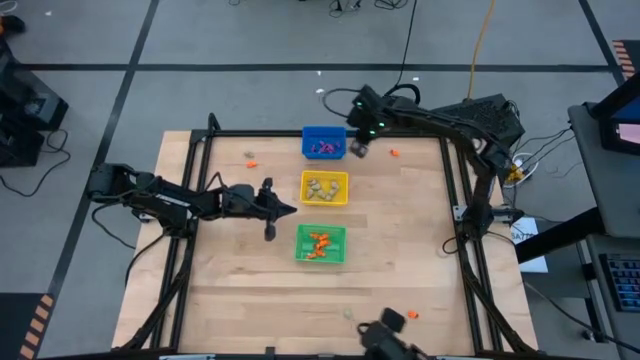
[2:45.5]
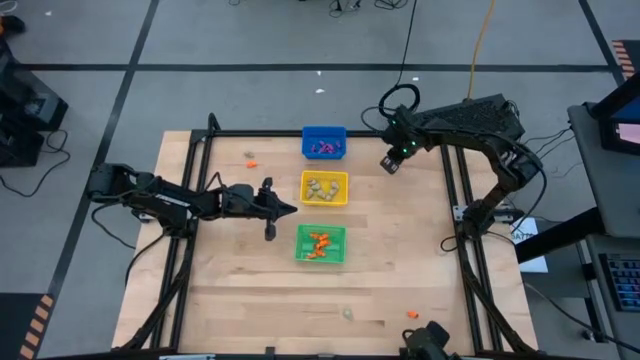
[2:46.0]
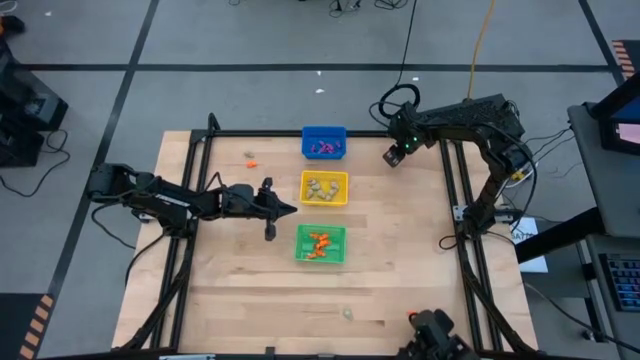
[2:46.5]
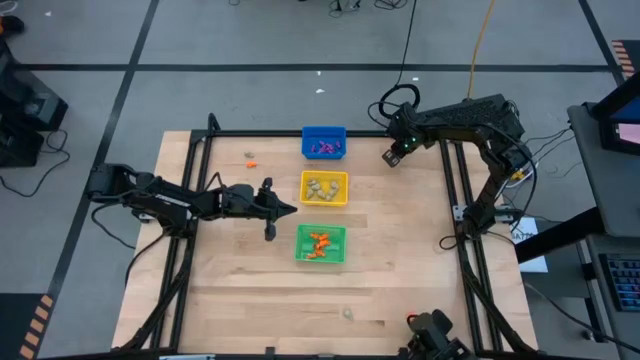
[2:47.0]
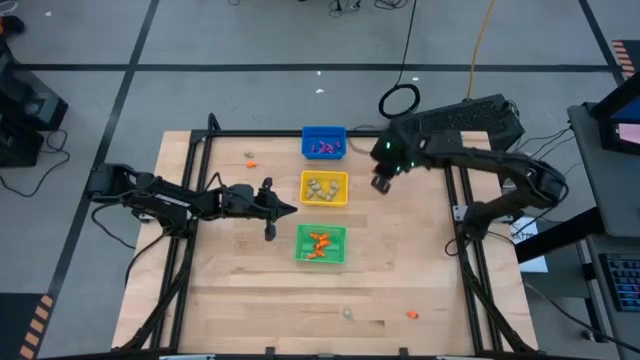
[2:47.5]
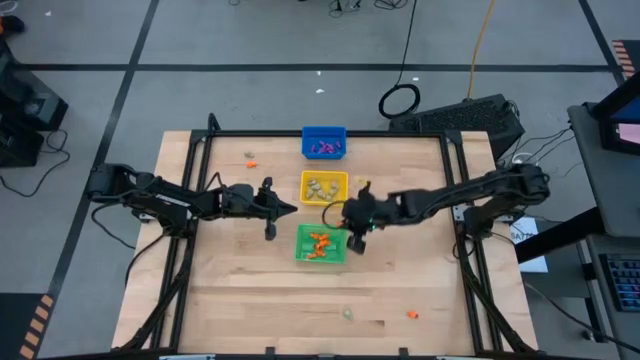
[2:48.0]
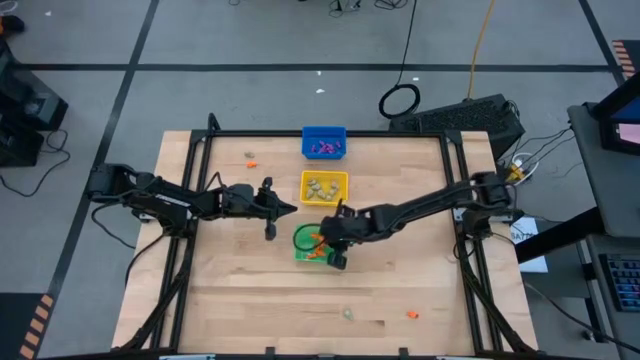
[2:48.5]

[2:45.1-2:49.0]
Task: Sort Halloween decoration
Put the right orange skeleton toy into the green bin

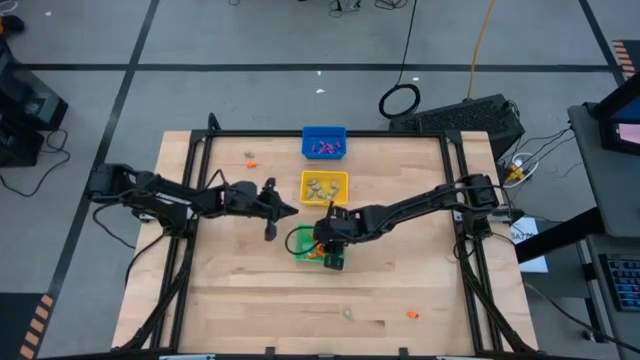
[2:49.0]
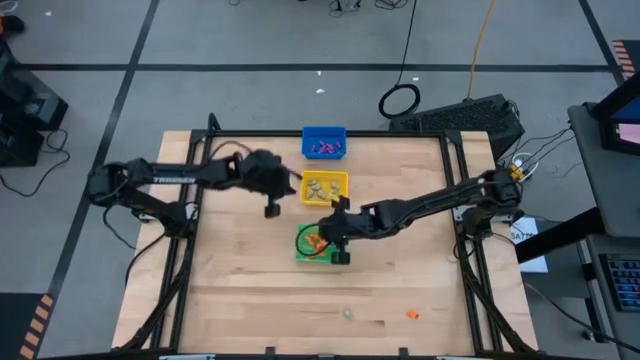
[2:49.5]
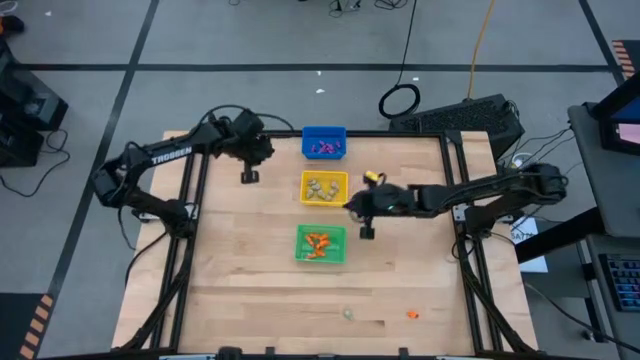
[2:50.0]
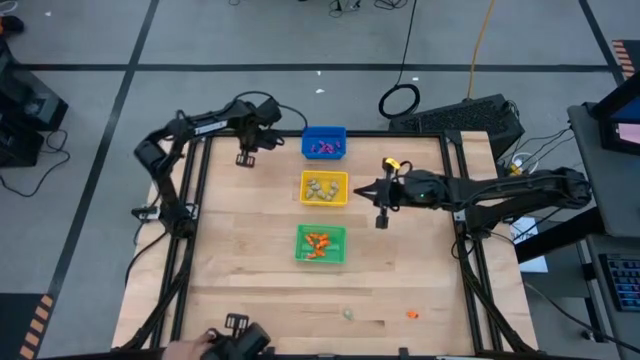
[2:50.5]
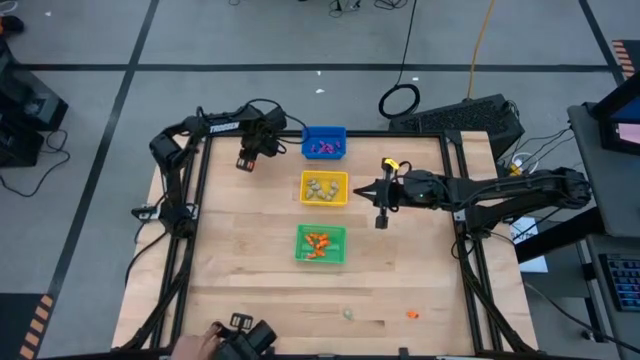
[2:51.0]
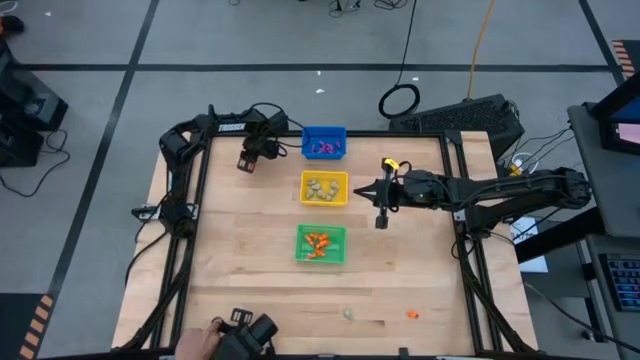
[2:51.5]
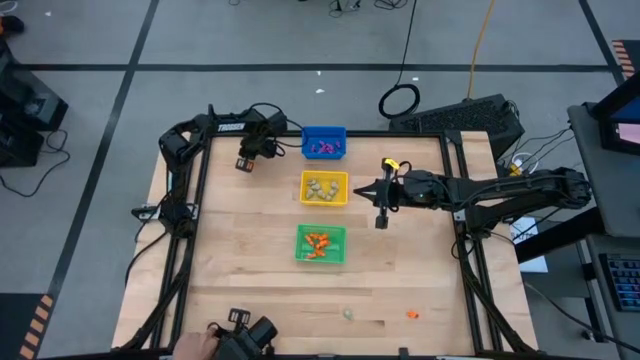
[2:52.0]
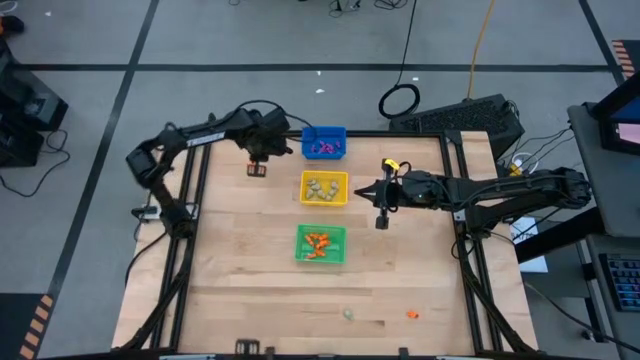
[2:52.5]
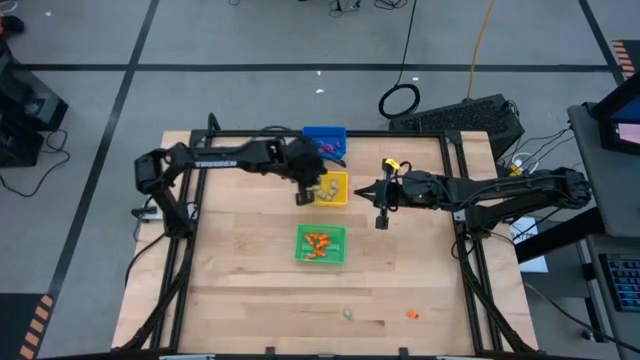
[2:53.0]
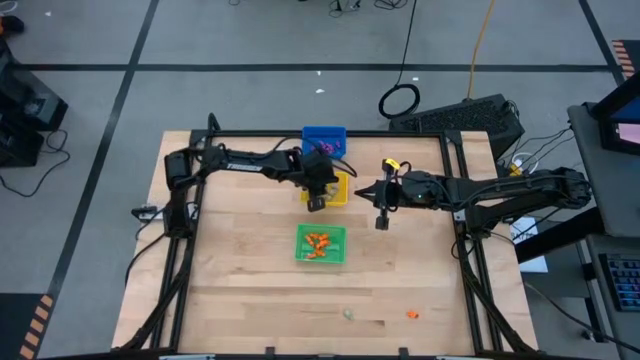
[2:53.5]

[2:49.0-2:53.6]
Put the skull toy into the yellow bin

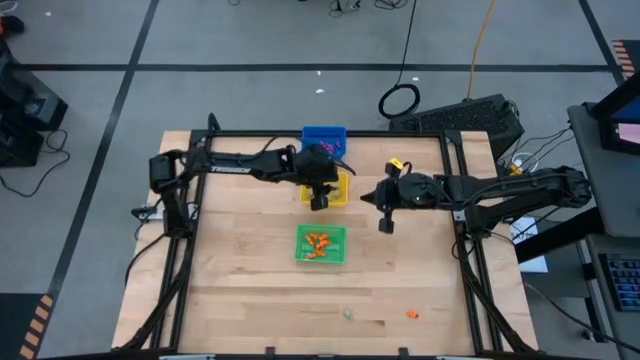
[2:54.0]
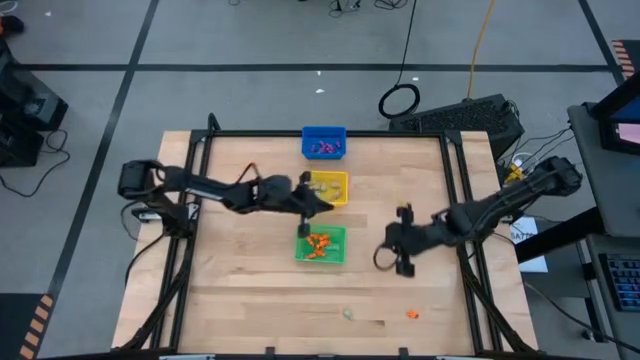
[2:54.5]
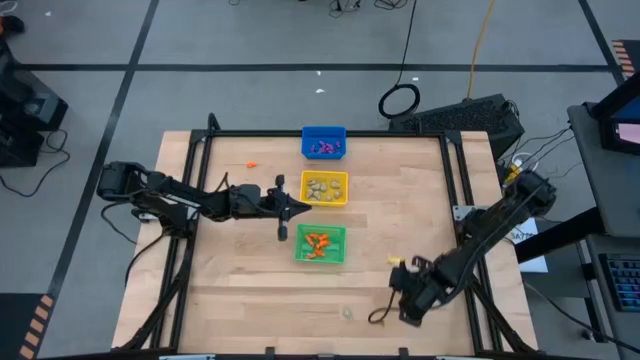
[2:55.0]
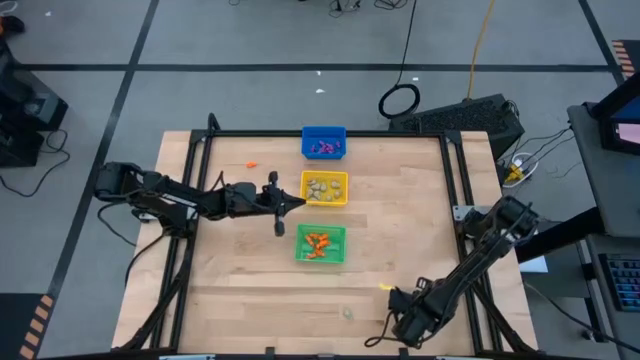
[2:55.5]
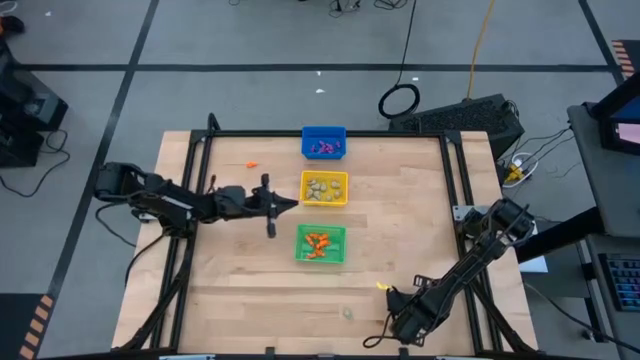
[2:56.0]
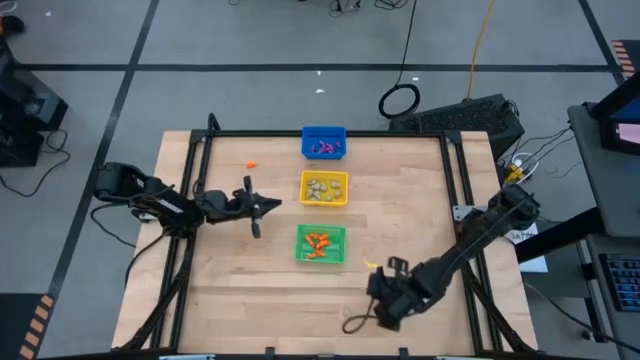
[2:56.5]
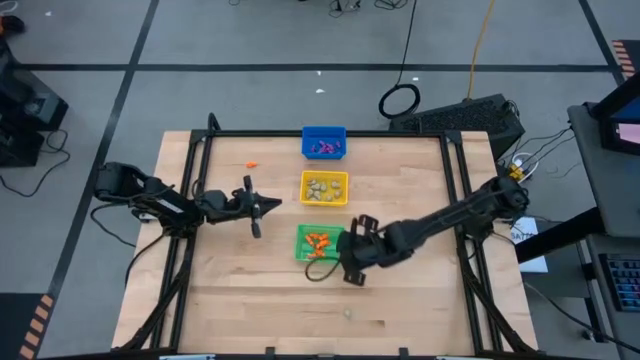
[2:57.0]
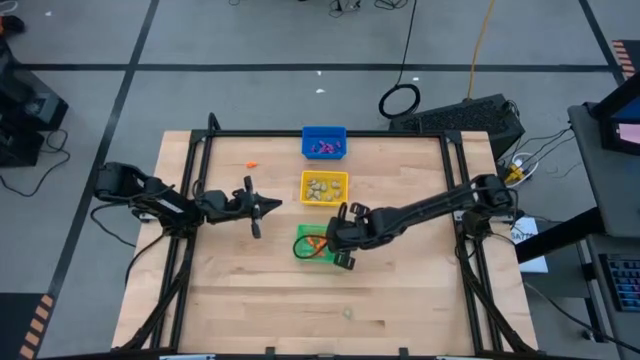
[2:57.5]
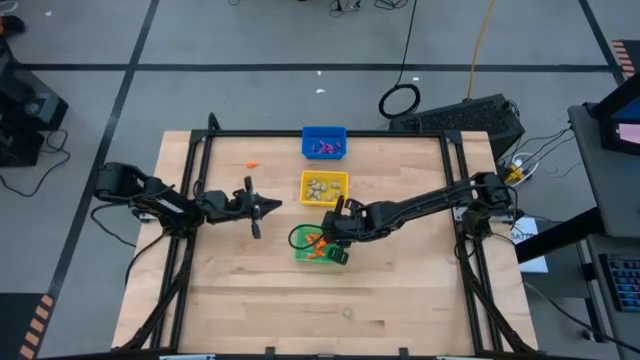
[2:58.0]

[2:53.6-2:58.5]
Put the orange skeleton toy into the green bin

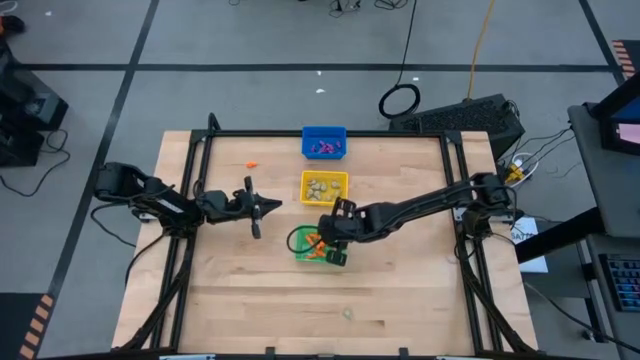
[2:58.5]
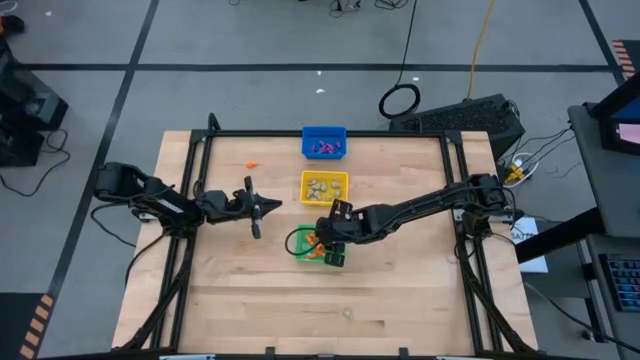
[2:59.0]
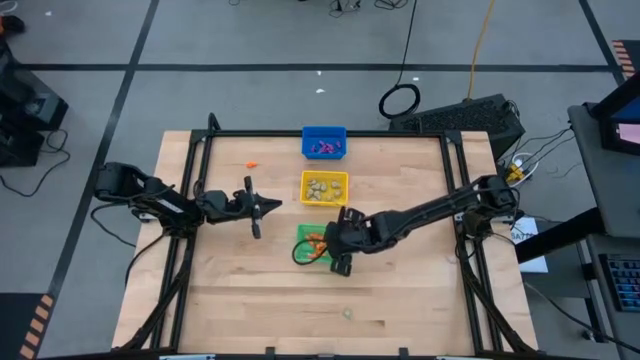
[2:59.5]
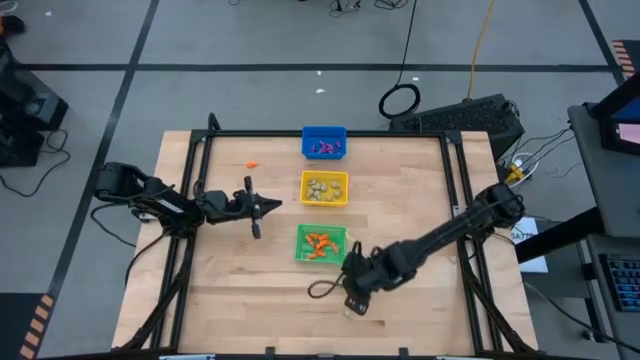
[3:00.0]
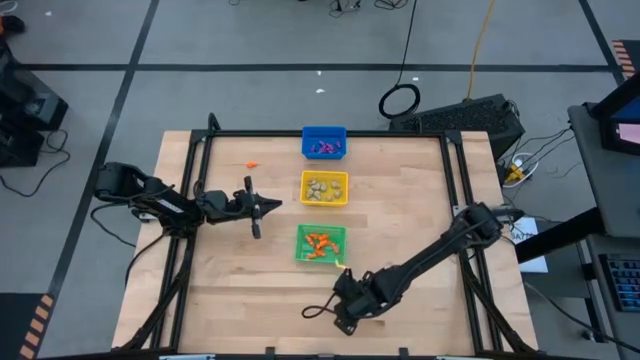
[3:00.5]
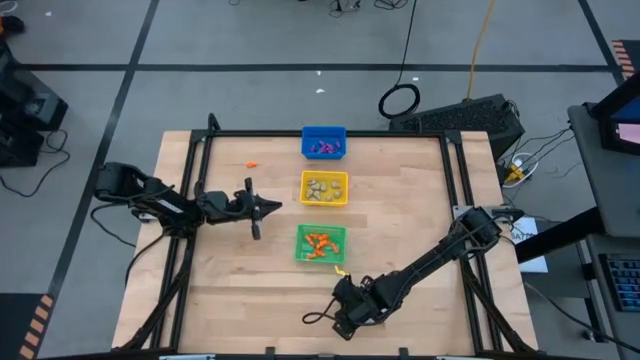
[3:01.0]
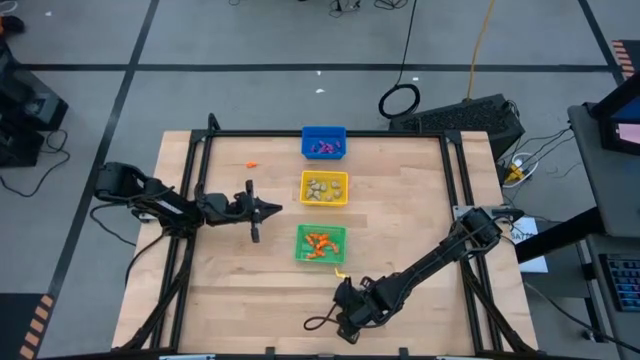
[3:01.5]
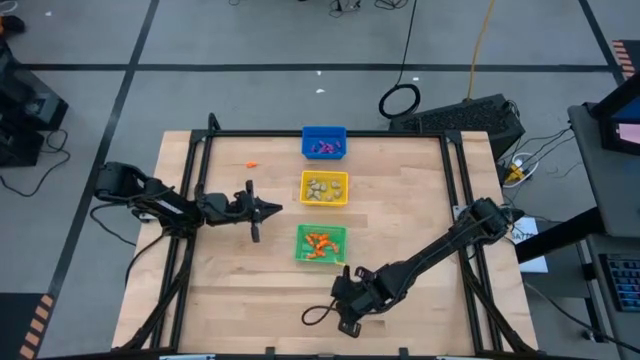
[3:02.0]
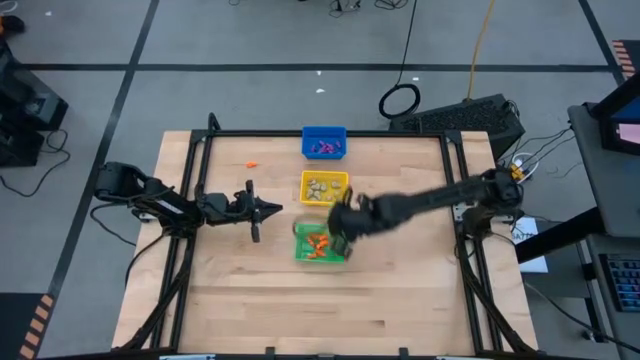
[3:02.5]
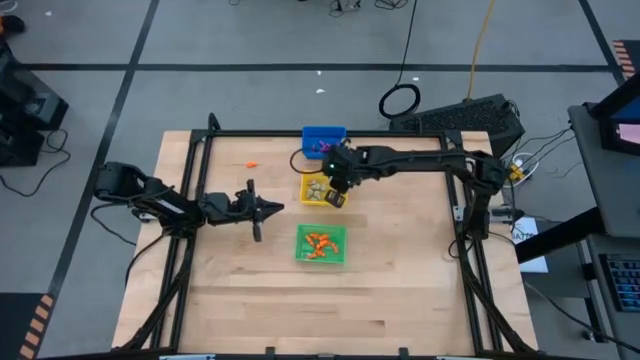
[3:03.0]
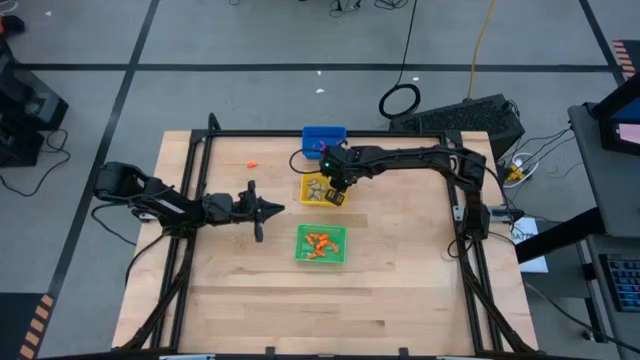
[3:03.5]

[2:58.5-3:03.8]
Put the skull toy into the yellow bin

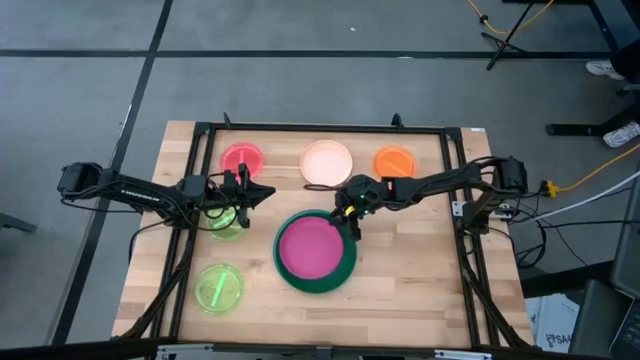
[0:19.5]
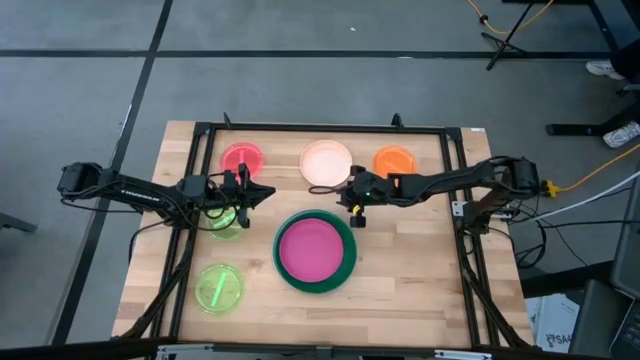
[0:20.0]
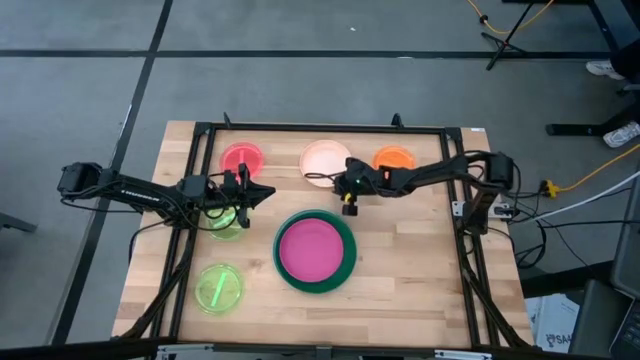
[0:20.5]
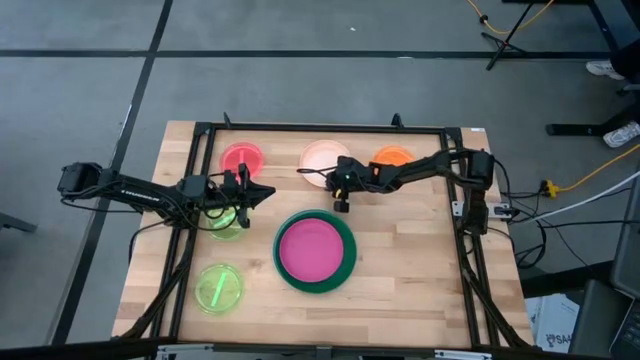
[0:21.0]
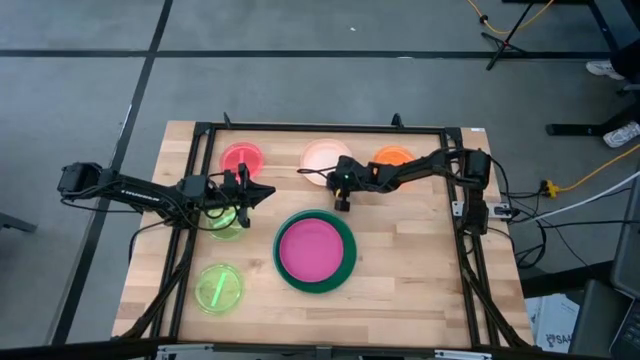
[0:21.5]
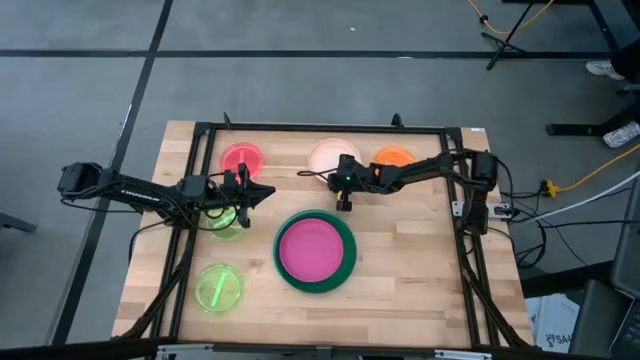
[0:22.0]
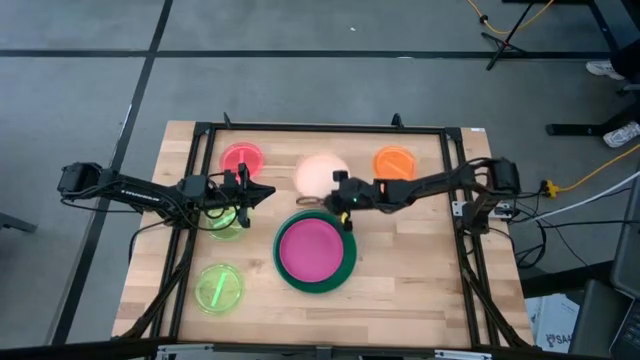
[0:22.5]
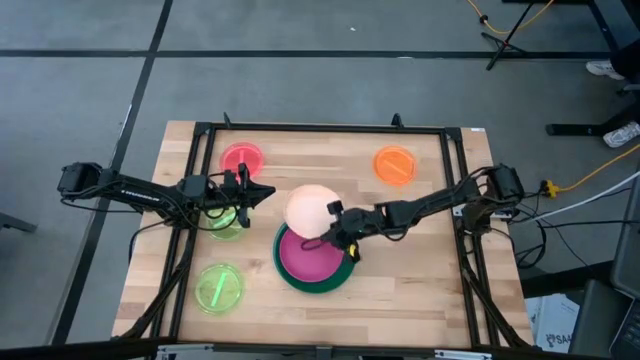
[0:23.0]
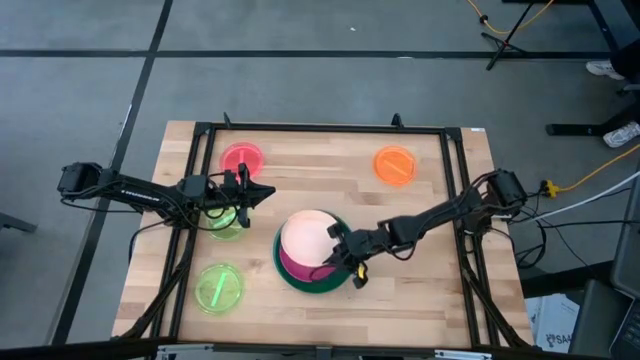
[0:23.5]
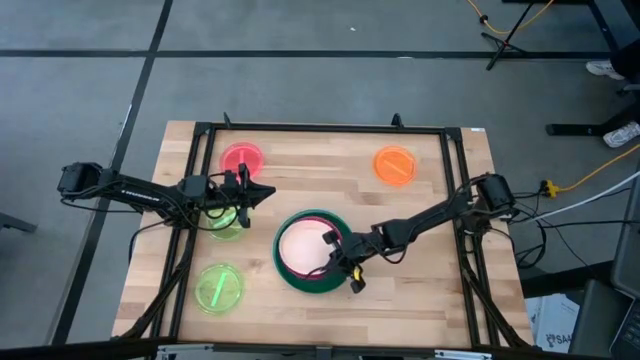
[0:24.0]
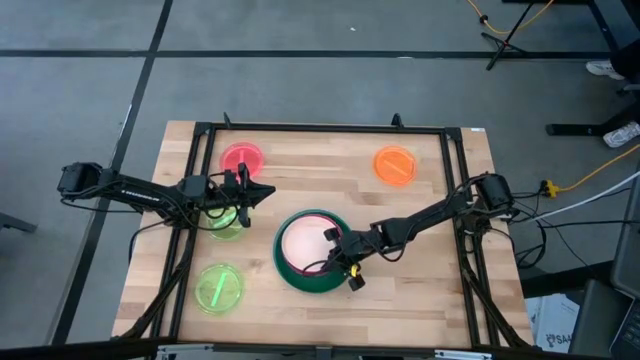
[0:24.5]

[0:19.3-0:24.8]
Task: Stack plastic plates
Stack the brown plate on the stacked plates
